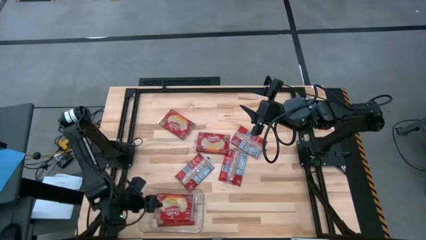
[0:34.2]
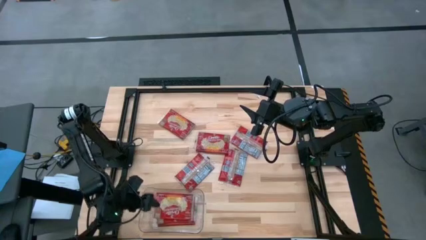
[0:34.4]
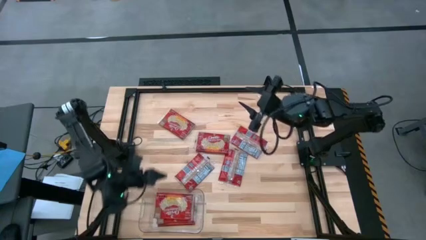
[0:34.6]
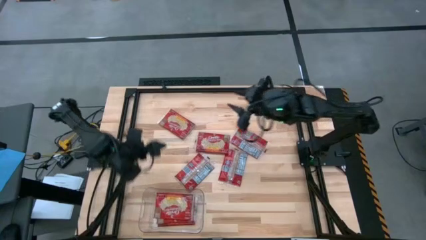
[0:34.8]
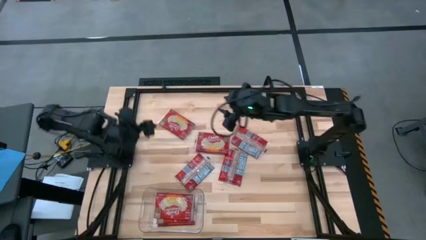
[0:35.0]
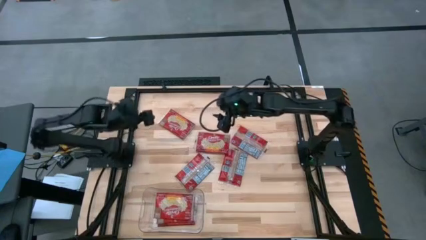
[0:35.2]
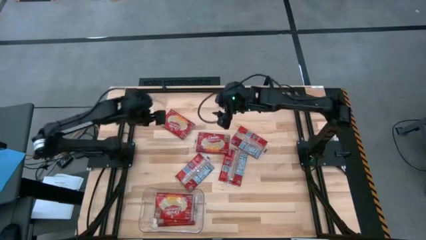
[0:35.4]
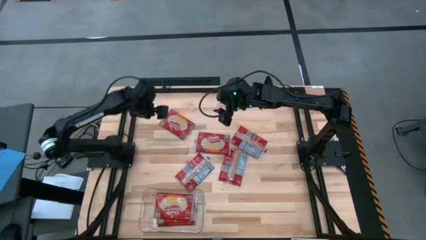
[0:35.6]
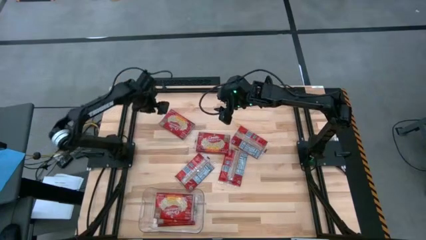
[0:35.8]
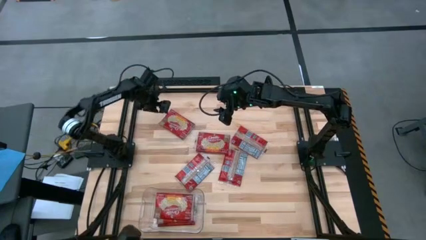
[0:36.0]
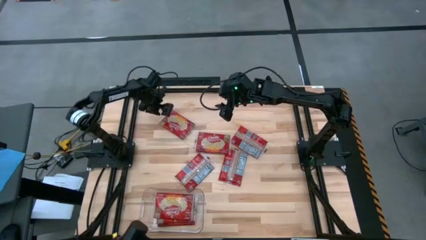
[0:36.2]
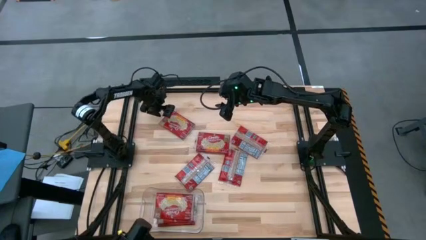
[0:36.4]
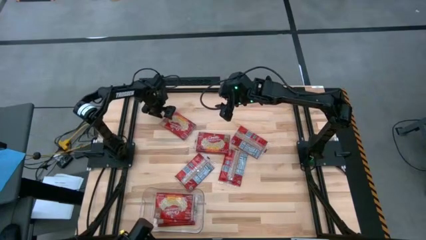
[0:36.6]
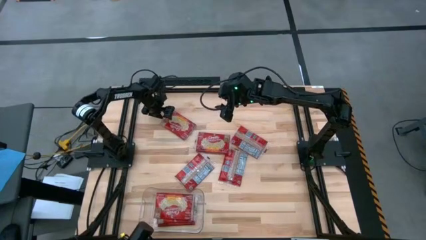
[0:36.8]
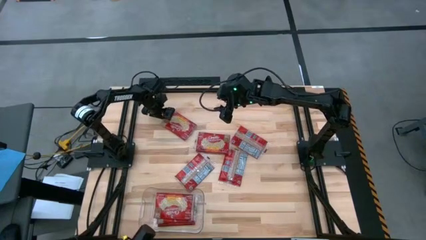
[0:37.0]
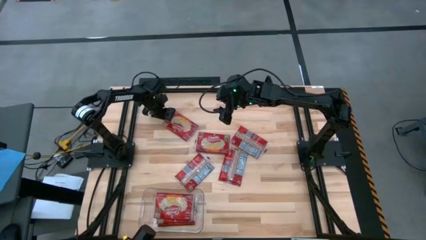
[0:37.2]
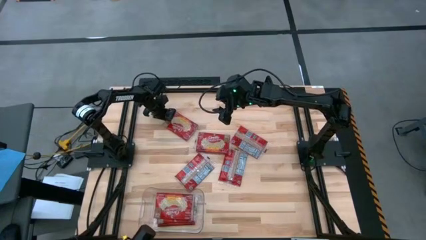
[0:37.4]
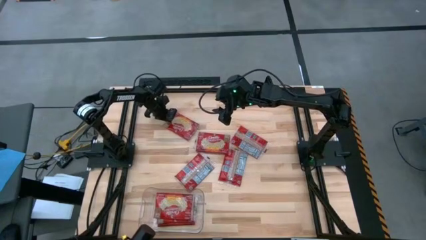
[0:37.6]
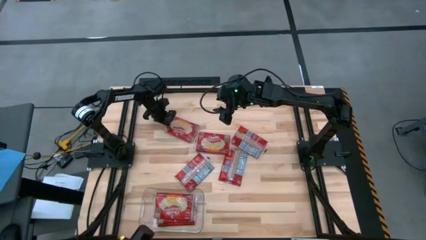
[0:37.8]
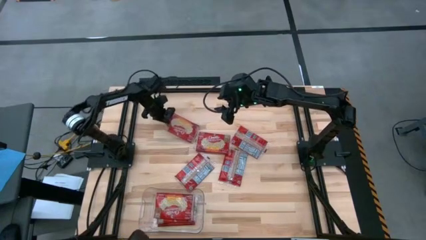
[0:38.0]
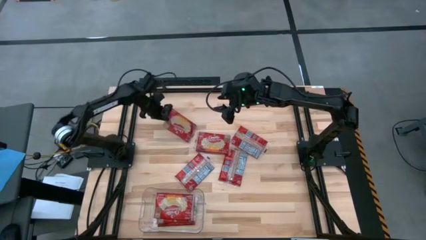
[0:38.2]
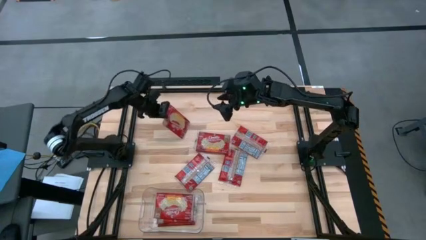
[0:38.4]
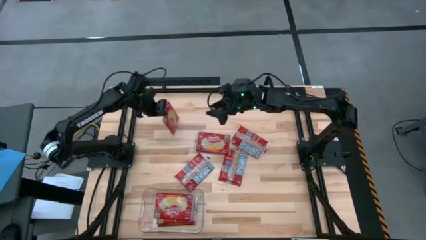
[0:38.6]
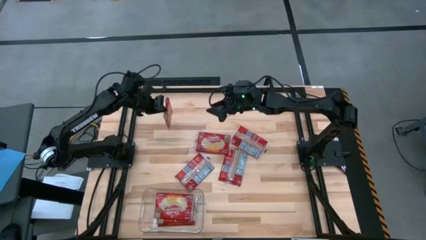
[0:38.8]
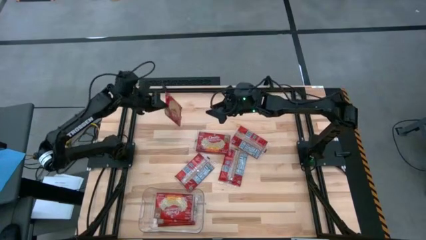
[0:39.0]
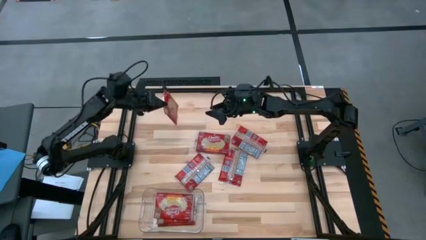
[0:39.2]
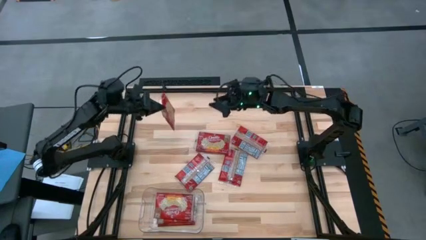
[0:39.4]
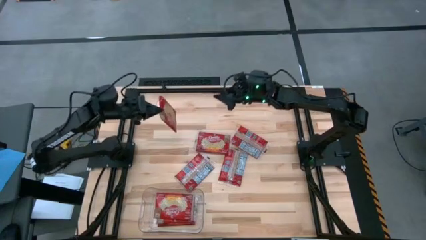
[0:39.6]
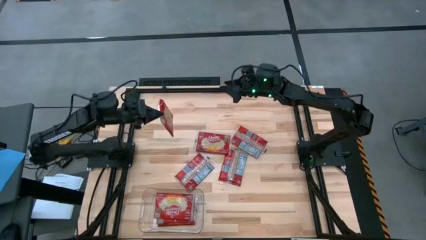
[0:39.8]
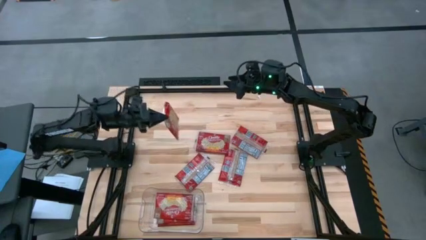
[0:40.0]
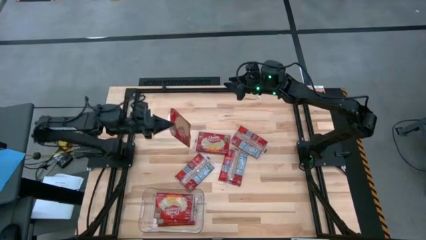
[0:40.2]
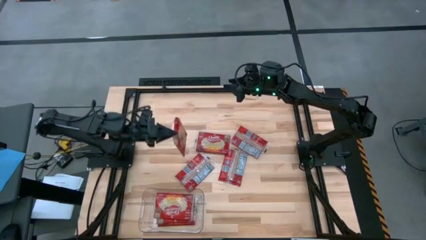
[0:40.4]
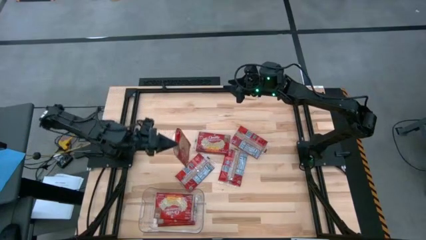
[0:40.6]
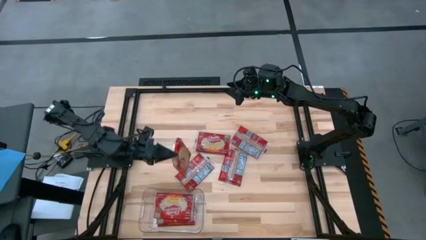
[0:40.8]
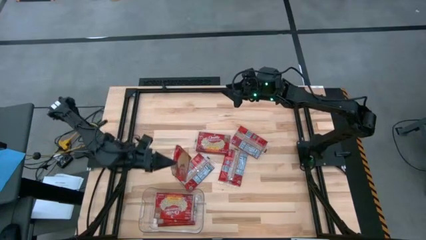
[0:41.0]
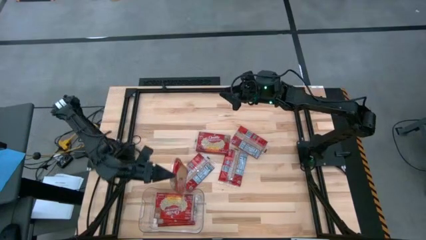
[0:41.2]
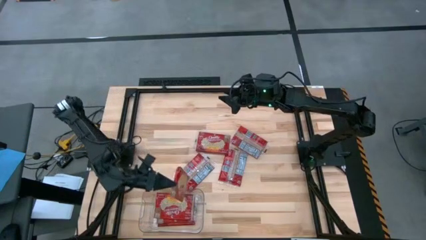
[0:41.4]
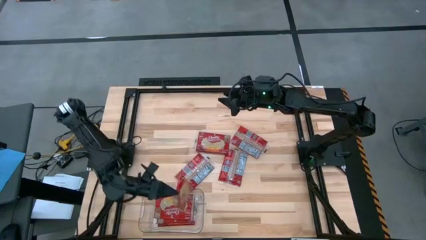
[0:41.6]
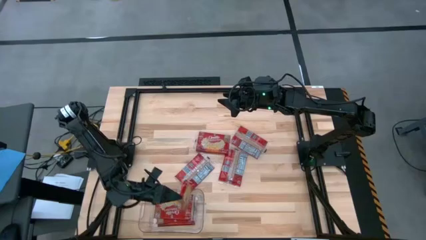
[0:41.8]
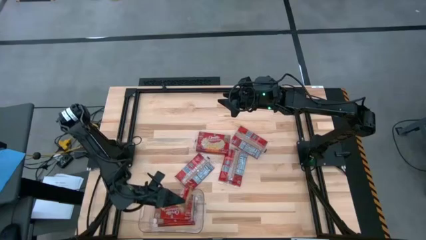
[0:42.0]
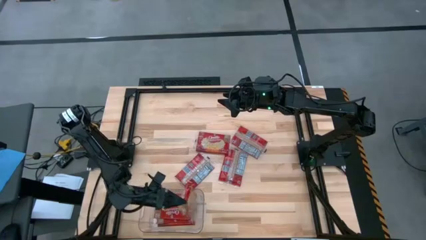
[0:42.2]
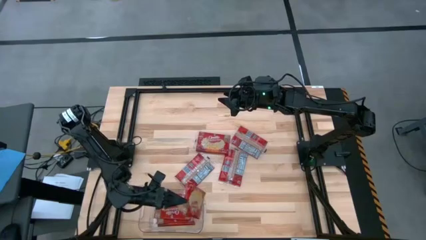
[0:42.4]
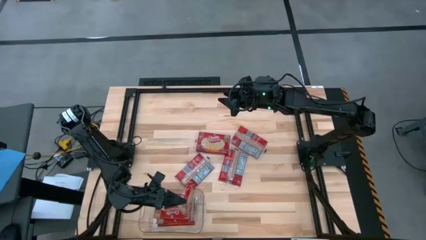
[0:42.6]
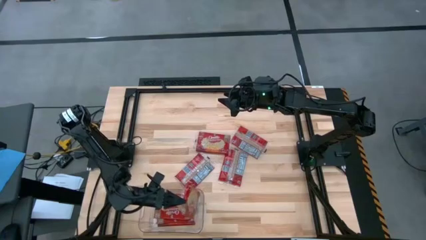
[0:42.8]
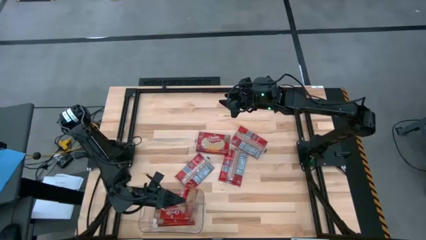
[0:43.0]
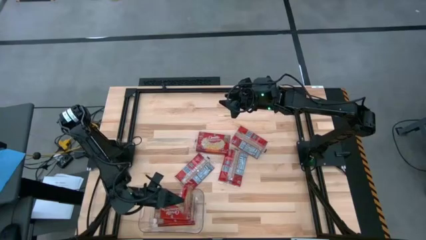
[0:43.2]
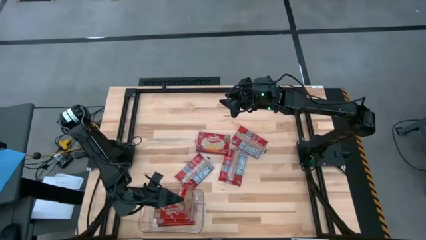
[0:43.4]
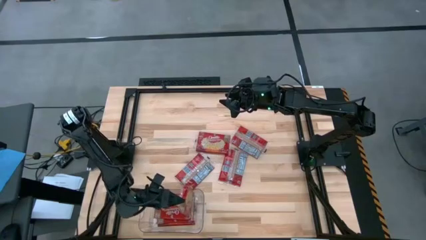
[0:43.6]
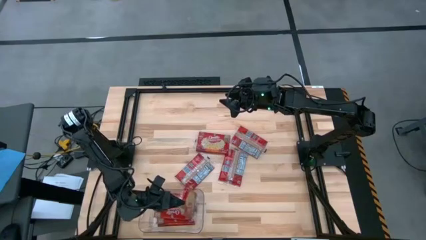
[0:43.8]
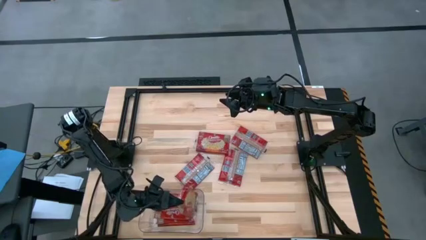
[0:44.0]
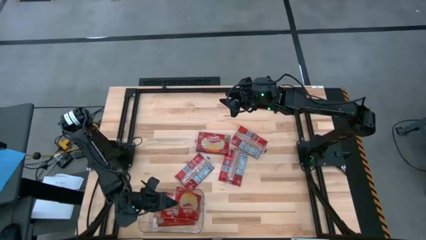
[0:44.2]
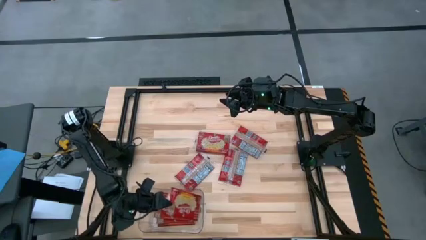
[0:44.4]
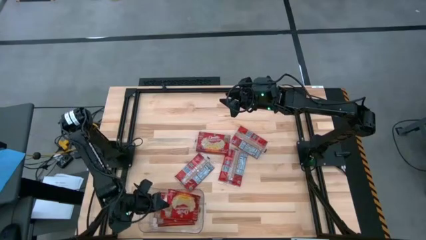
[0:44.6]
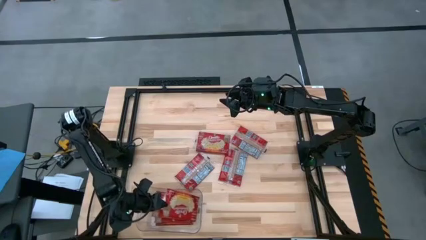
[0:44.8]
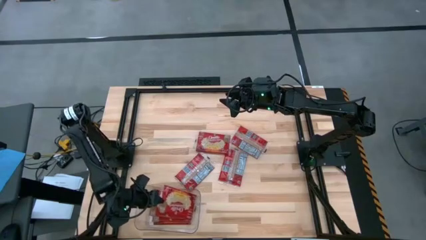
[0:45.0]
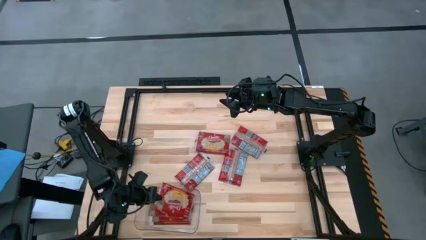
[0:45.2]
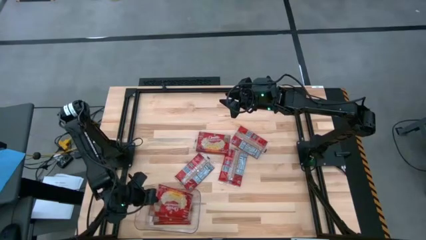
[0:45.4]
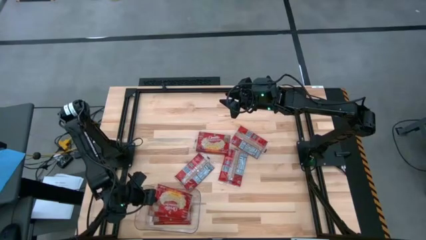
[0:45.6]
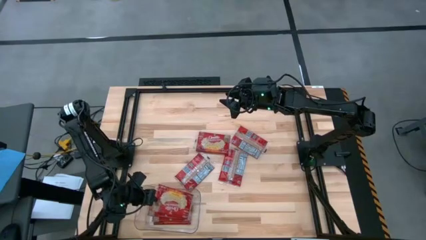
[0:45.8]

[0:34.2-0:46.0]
Task: Sort popcorn bags into baskets
Put the red popcorn bag into the transparent bin
